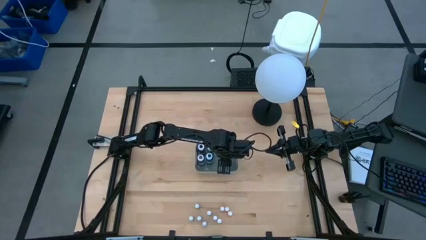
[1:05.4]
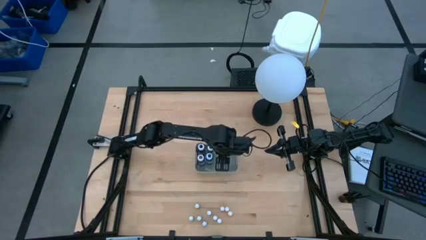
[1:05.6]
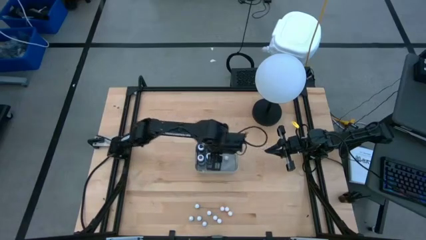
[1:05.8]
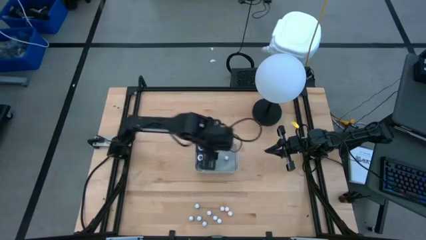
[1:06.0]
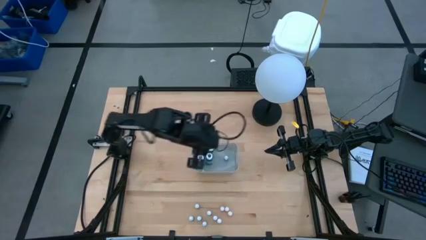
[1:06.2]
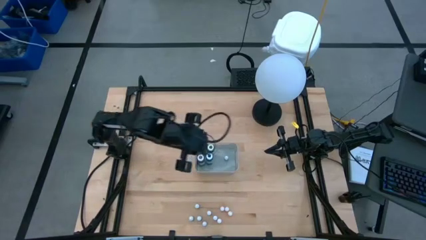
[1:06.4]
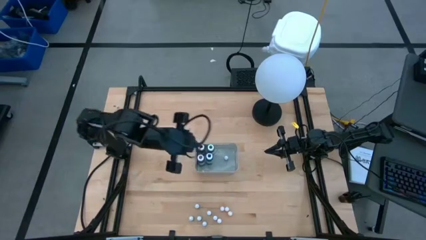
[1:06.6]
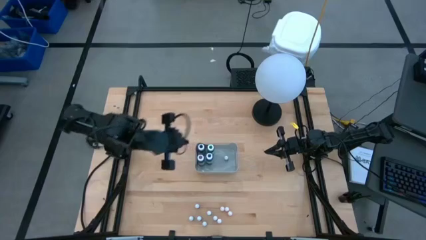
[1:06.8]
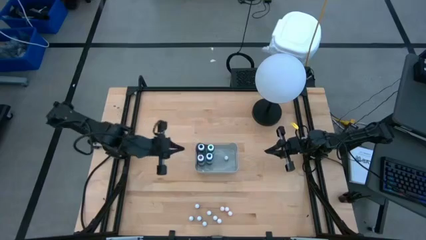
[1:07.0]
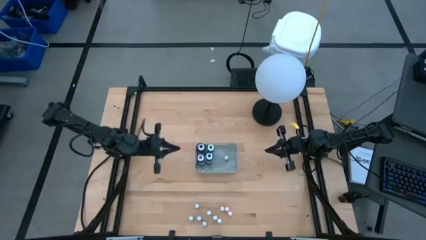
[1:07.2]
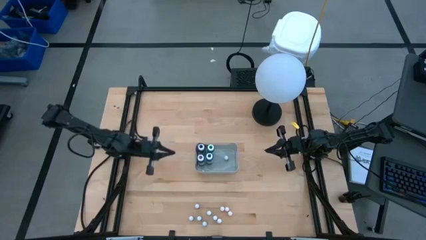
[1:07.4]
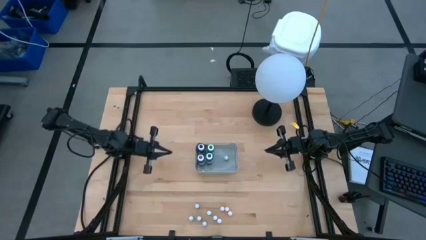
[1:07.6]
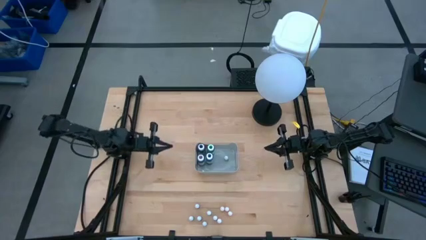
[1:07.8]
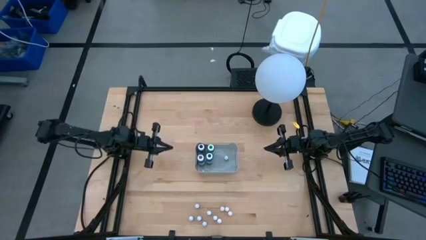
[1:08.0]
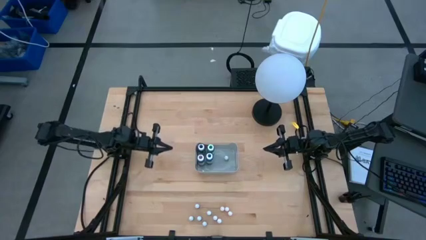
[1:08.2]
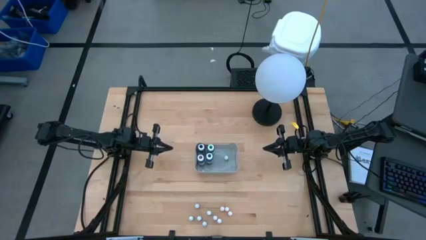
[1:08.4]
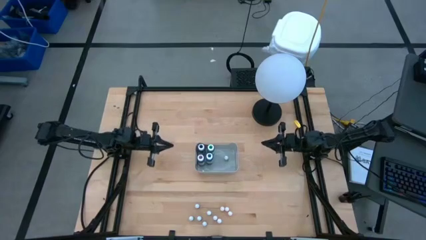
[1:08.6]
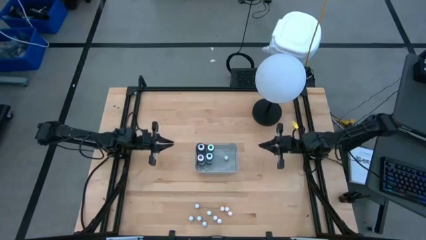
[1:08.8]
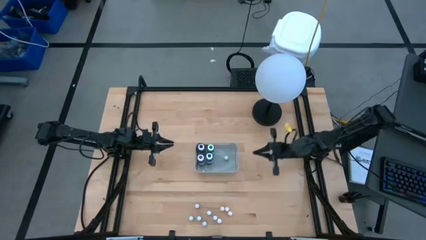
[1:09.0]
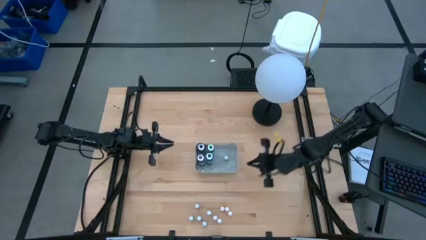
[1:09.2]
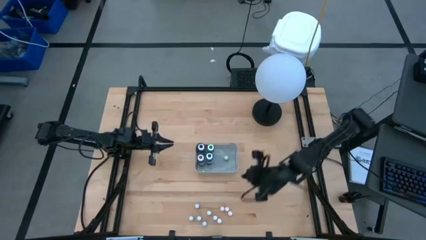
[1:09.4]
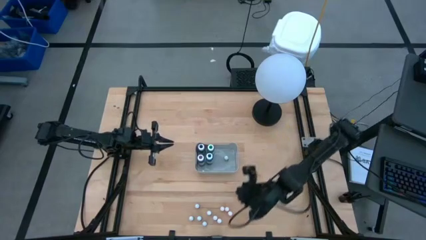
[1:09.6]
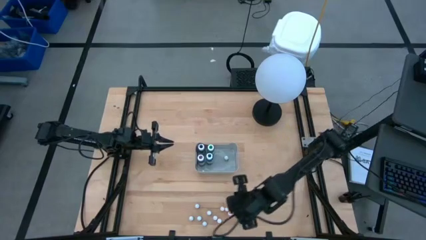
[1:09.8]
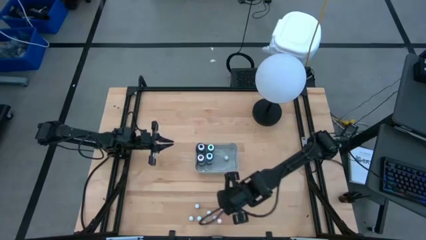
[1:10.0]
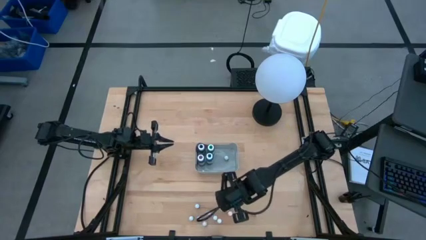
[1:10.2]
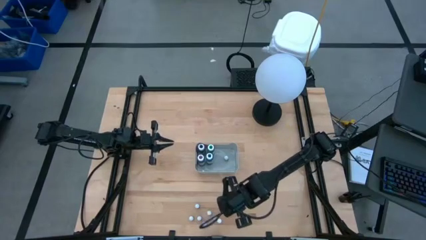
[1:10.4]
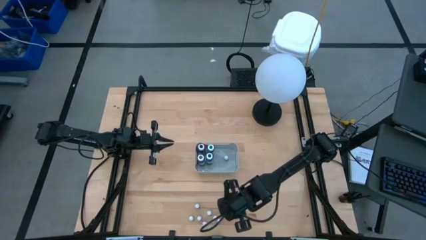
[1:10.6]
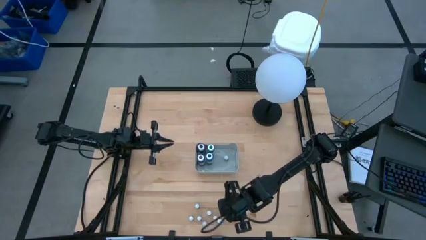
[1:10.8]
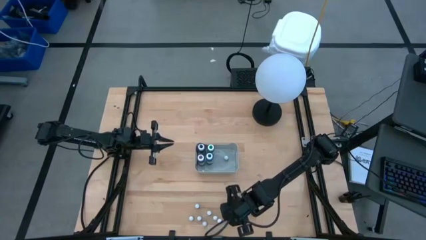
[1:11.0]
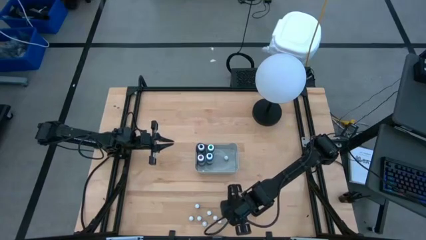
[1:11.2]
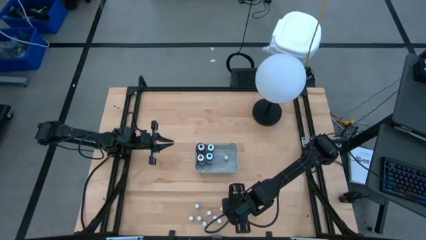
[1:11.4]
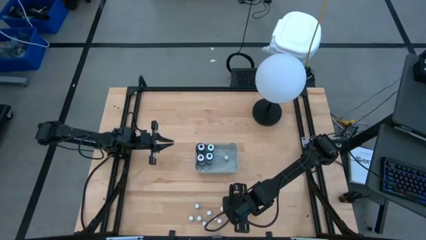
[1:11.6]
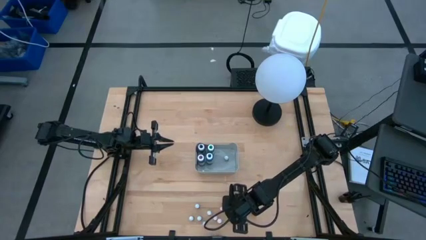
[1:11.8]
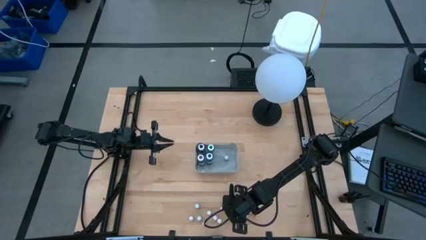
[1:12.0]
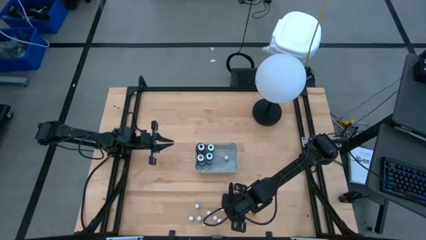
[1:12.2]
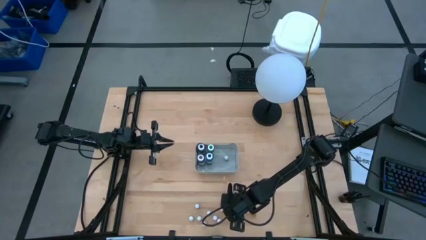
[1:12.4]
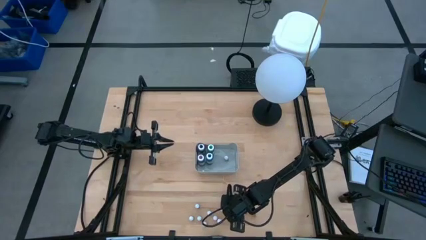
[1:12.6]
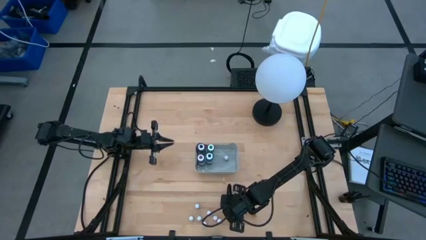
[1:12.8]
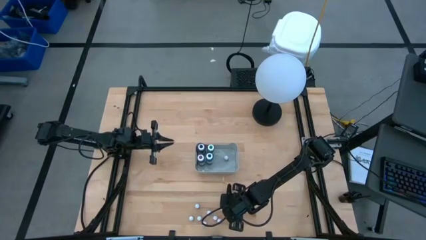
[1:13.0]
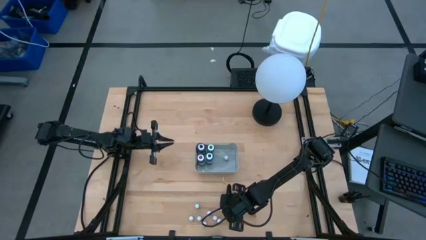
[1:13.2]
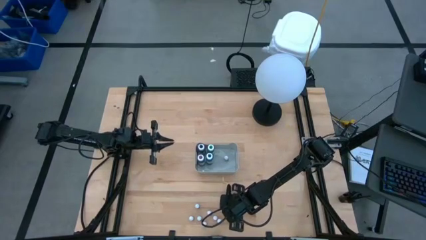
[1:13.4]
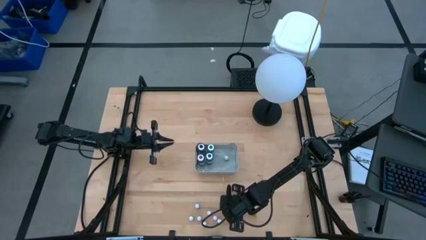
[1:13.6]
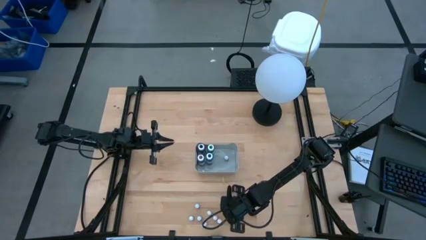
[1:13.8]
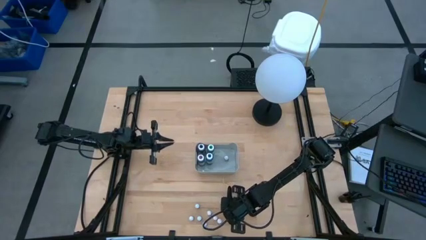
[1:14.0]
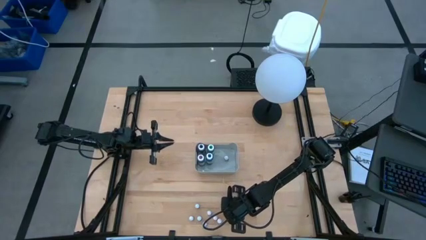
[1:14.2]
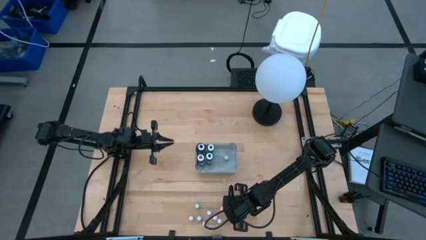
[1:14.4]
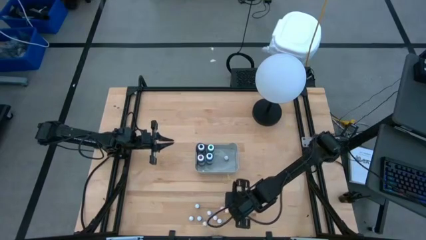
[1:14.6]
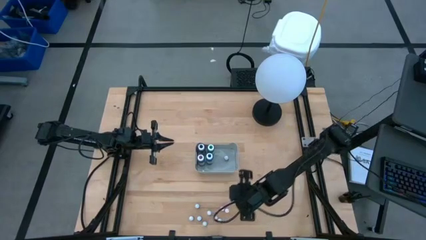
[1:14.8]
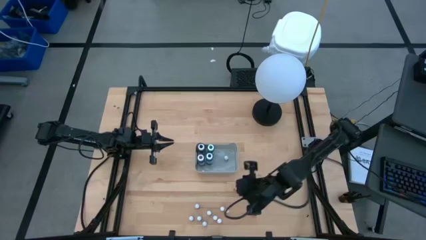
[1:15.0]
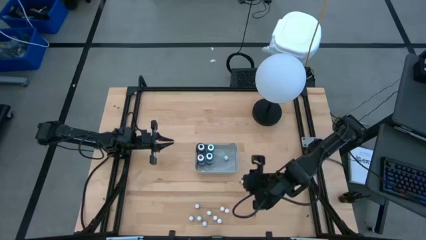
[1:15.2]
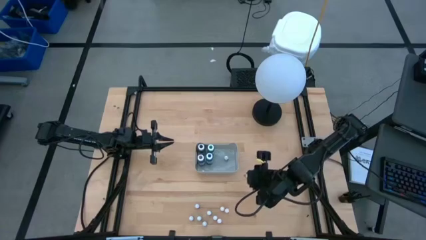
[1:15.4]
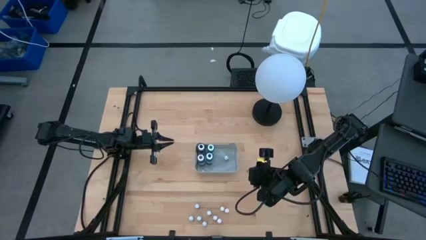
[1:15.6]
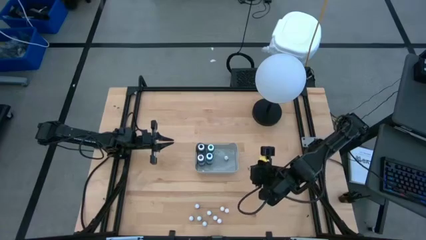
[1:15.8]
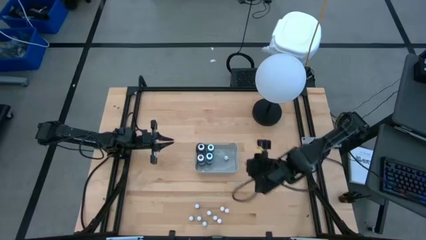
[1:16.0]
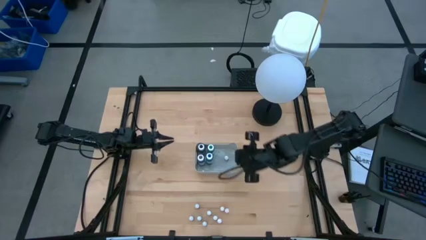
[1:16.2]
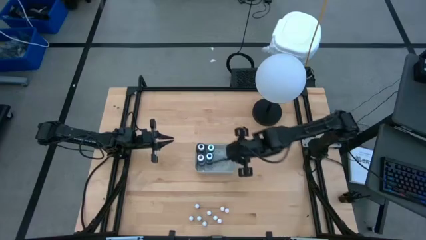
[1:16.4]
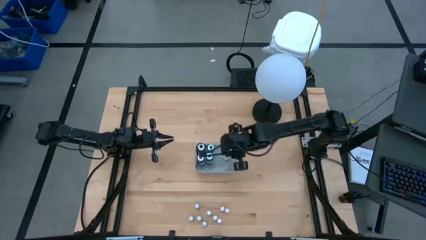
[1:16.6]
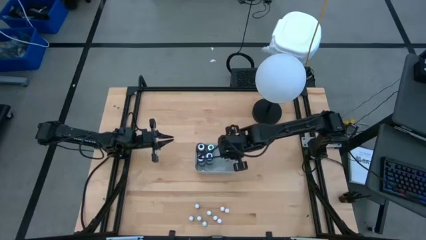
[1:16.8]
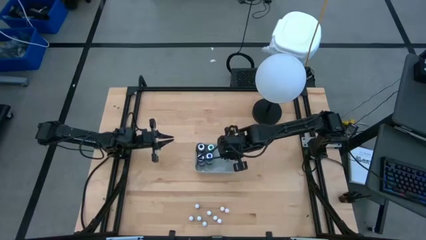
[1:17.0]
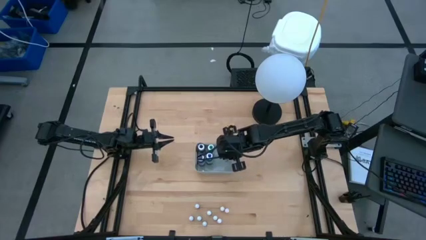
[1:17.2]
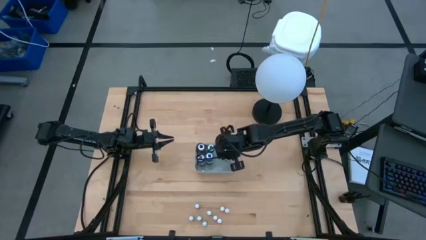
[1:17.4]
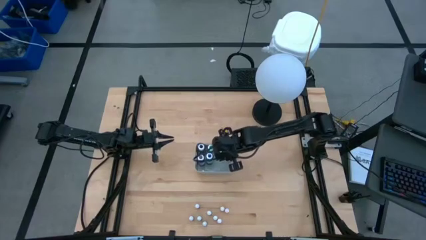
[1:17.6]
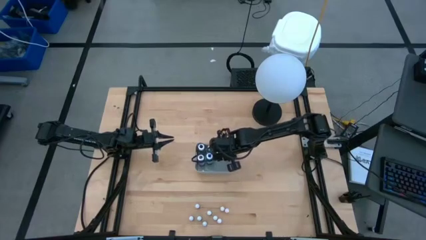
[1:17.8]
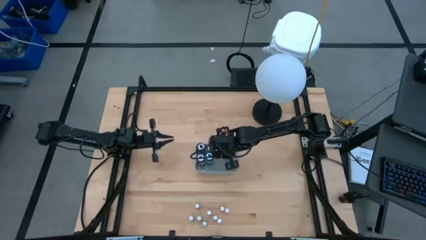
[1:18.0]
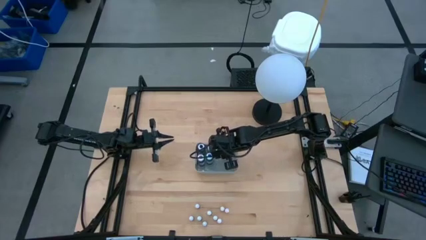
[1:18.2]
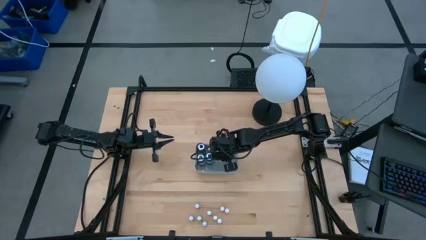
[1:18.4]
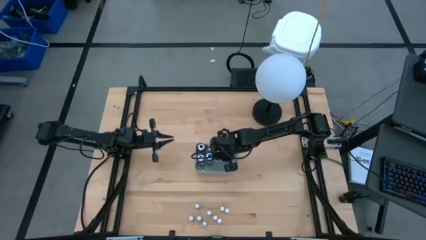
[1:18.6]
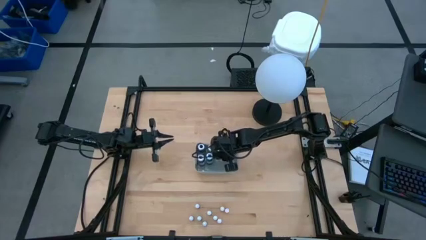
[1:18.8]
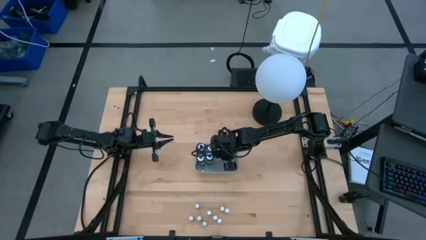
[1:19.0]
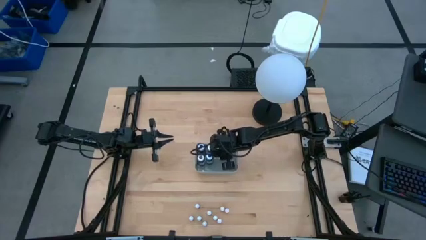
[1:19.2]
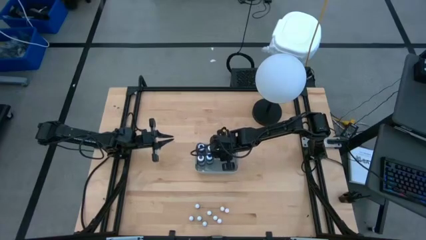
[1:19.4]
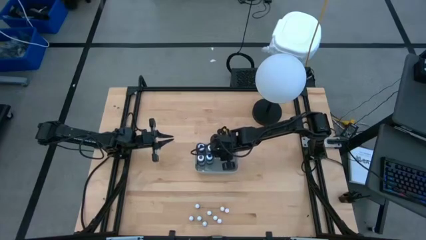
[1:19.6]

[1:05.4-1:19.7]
Task: Pick & Place food coloring
Put the small orange food coloring bottle into the gray bin
